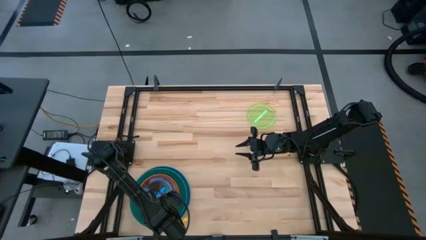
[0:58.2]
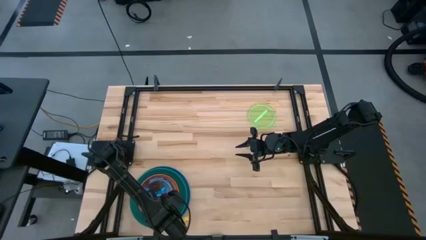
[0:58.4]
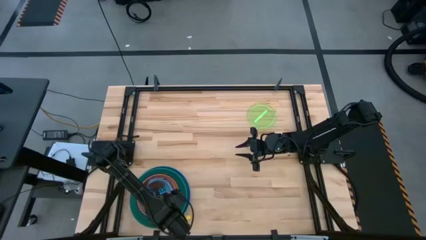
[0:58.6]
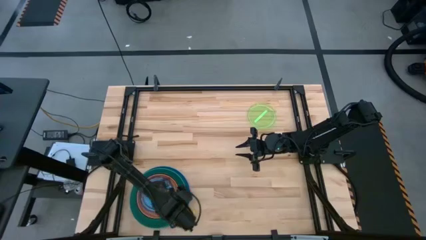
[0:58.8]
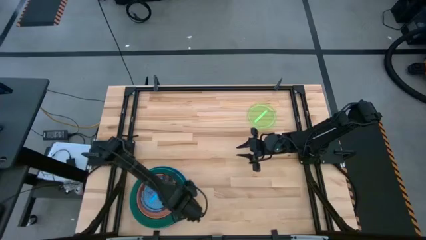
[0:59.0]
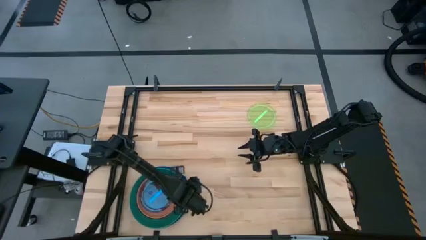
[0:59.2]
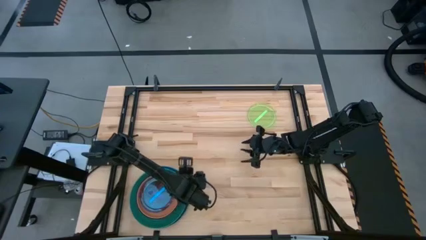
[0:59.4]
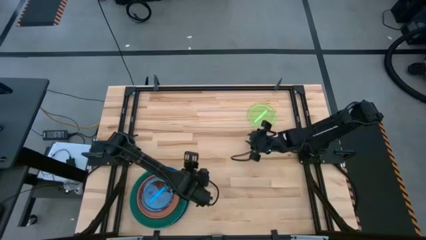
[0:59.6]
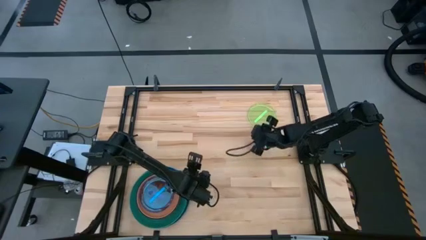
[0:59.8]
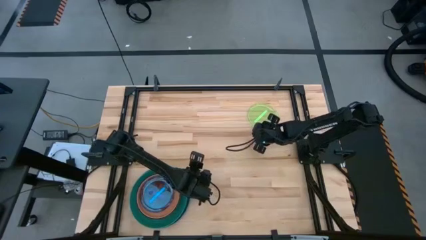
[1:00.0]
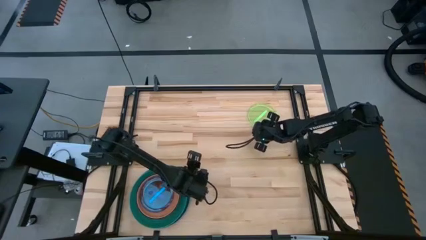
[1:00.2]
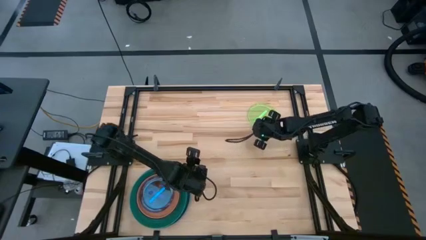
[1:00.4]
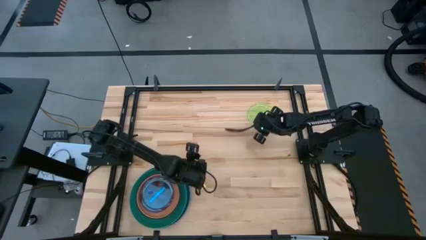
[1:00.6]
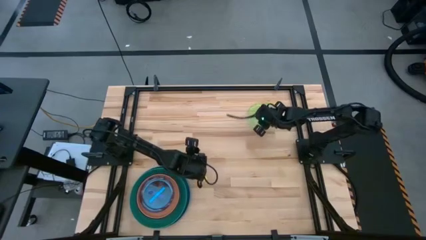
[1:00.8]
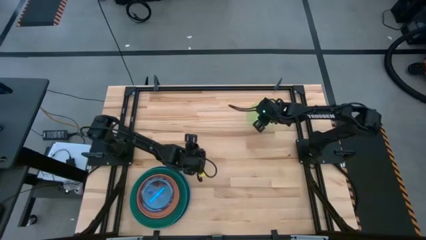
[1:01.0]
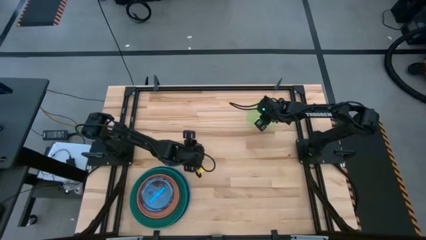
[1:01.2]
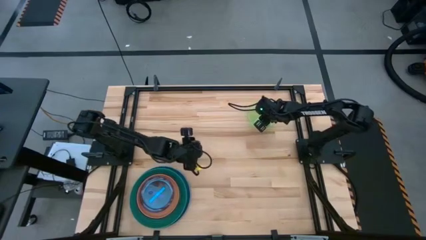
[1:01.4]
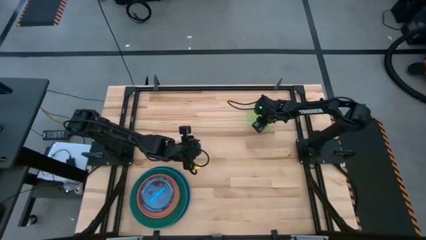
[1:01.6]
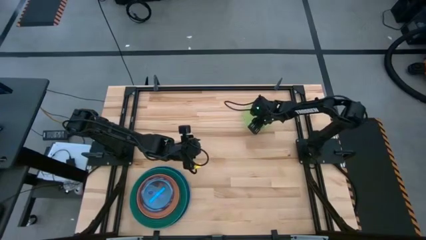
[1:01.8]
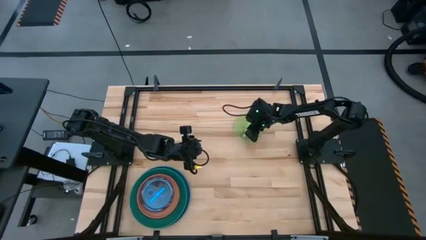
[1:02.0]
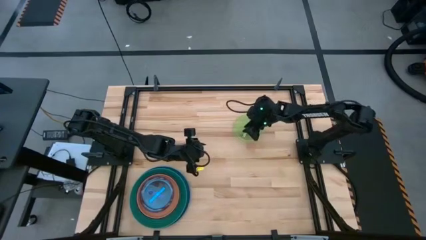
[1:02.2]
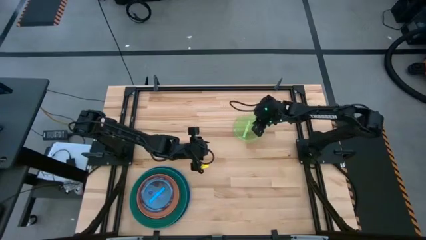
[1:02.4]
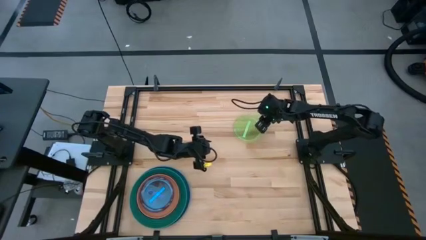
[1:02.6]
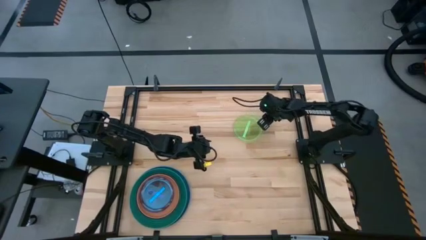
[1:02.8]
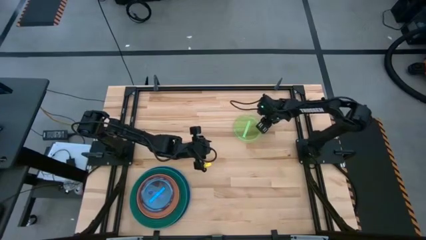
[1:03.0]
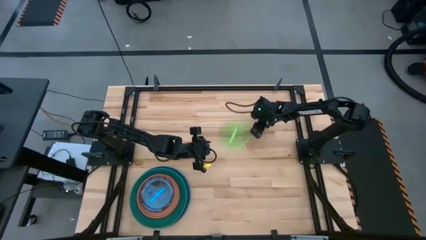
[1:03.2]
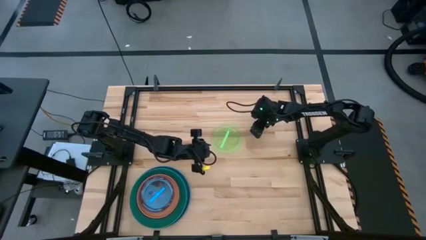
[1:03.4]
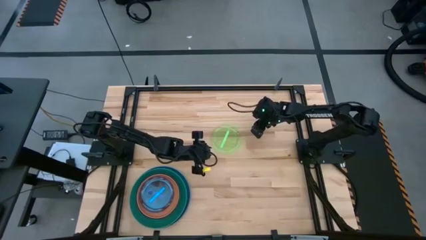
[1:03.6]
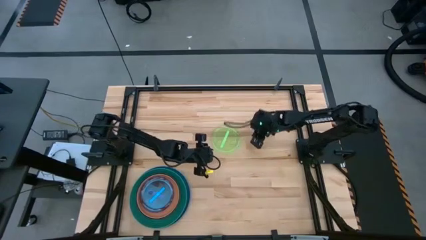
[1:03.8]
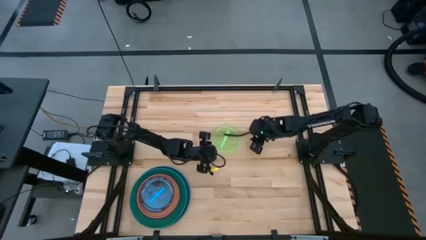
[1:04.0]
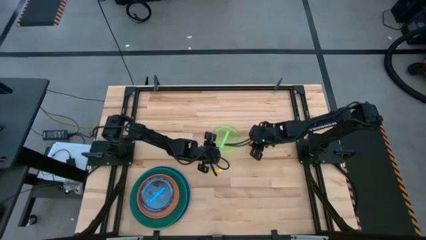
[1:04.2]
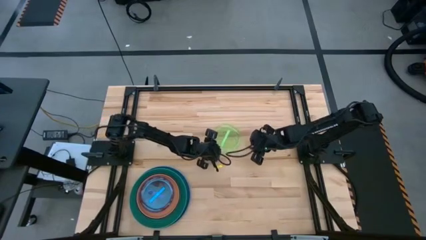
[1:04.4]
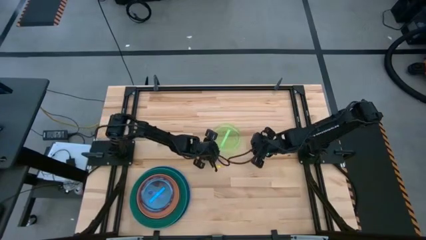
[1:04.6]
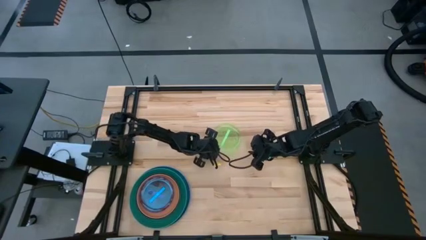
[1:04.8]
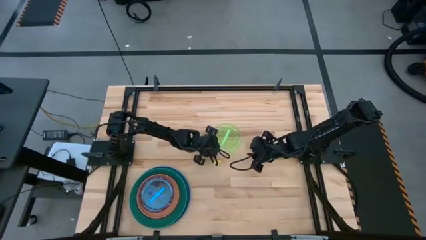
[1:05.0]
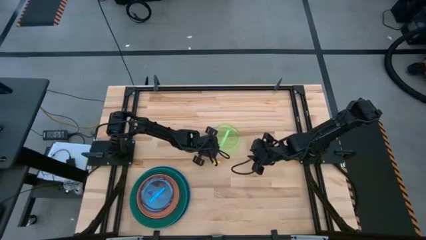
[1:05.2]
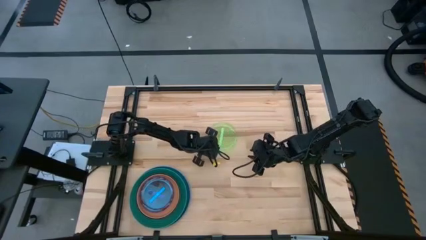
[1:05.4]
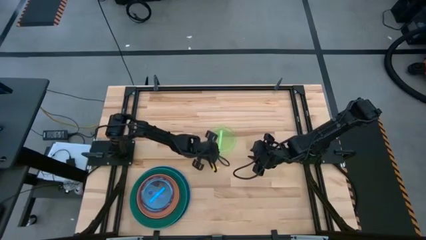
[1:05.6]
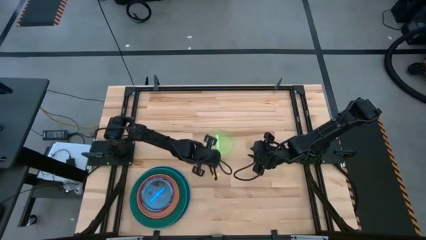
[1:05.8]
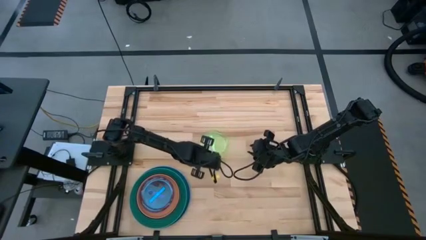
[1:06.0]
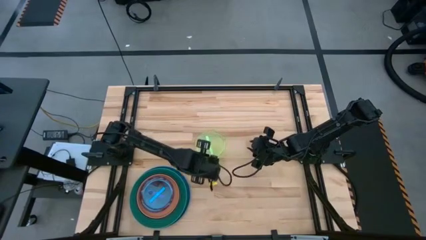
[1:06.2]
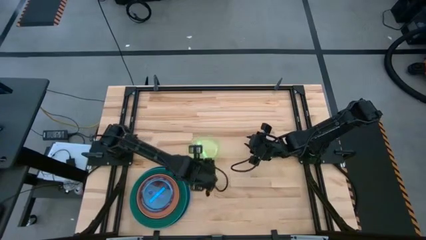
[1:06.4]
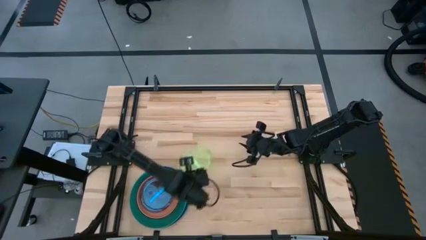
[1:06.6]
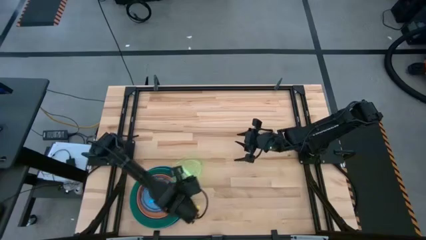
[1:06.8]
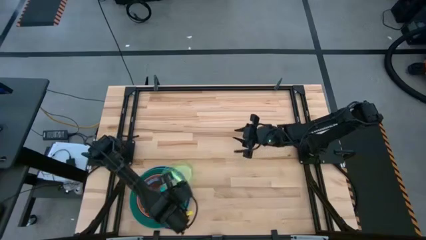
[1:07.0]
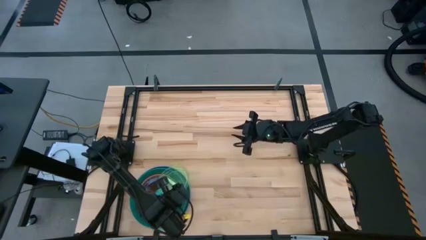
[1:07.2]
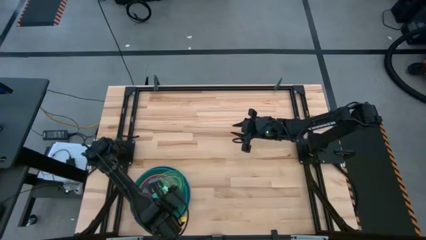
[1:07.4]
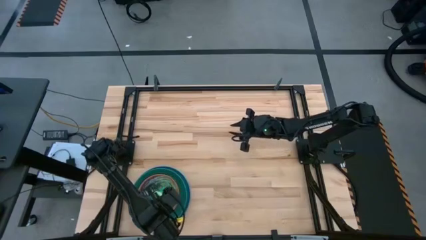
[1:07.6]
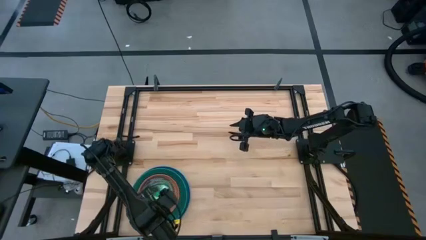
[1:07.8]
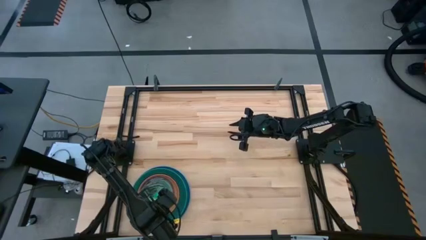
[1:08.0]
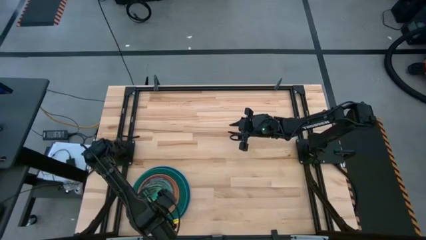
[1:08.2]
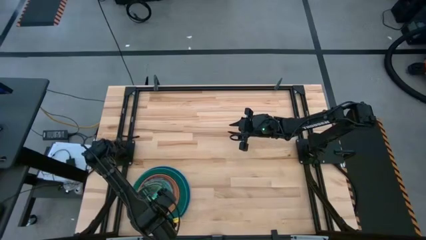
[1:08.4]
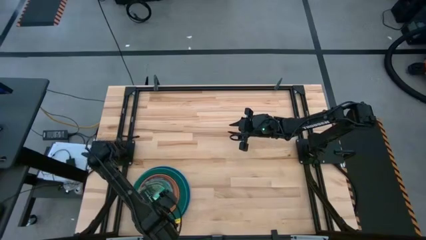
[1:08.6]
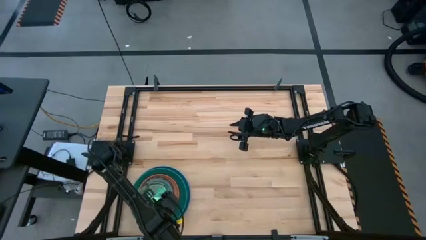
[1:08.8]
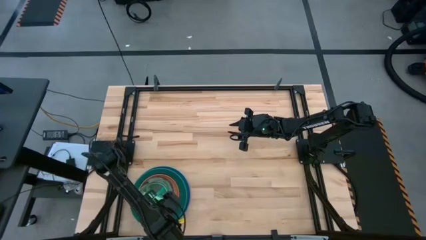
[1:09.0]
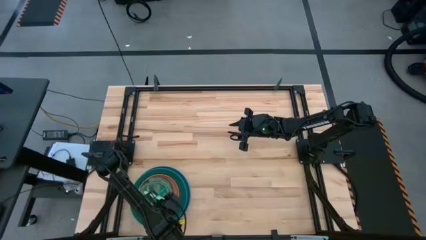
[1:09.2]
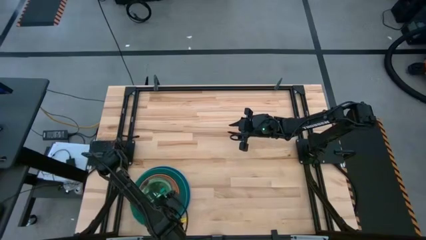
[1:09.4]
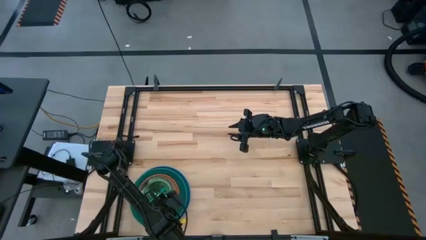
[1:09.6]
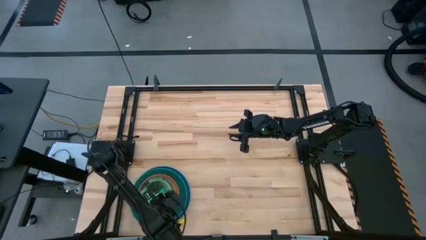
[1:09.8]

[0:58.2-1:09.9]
Task: Stack plastic plates
Stack the light green plate on top of the blue plate

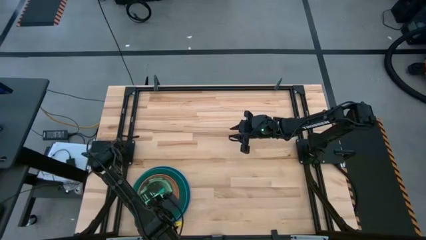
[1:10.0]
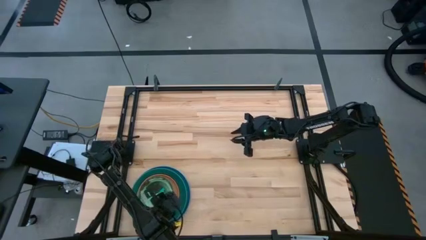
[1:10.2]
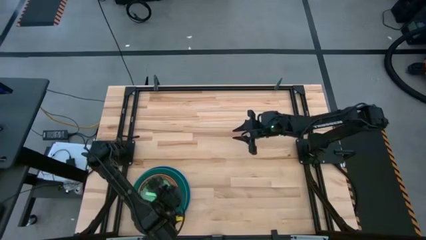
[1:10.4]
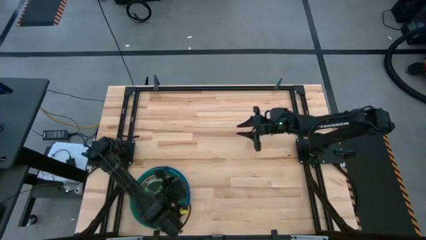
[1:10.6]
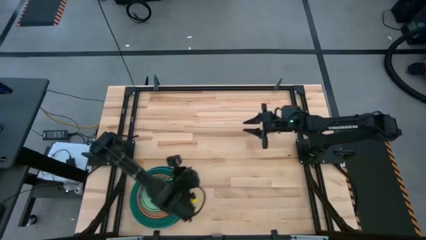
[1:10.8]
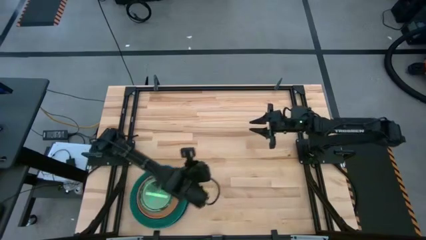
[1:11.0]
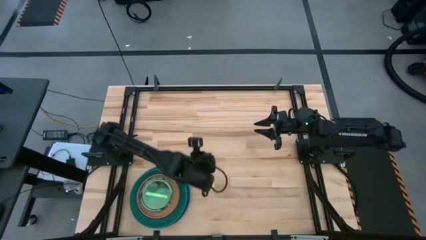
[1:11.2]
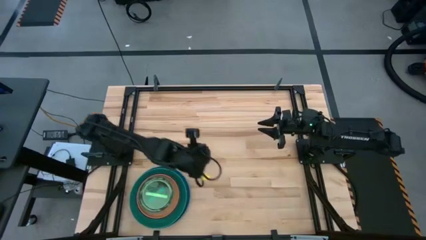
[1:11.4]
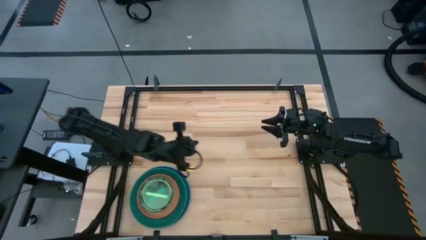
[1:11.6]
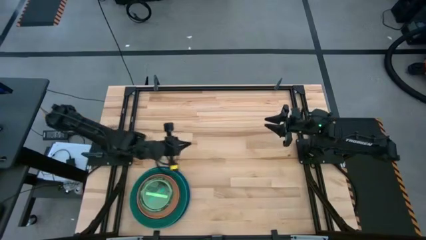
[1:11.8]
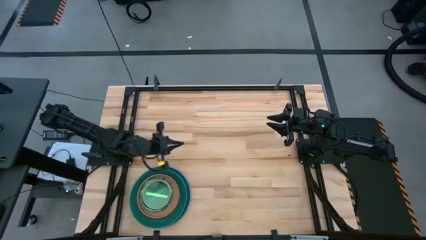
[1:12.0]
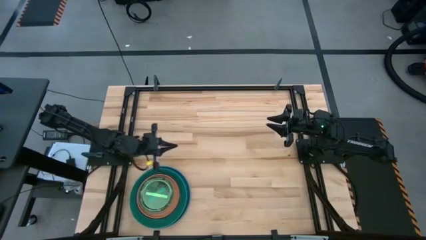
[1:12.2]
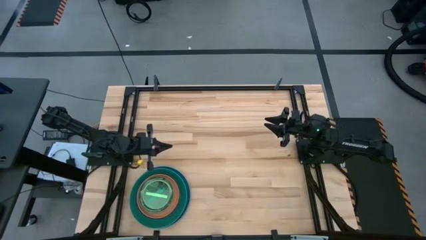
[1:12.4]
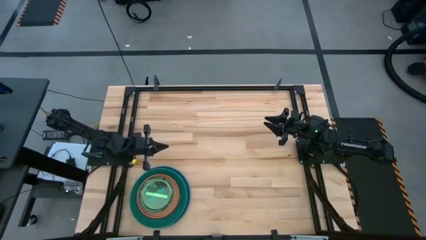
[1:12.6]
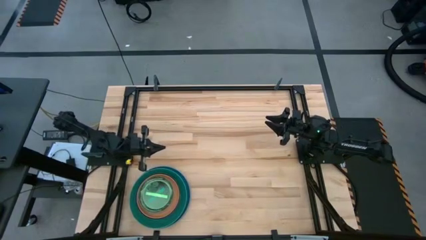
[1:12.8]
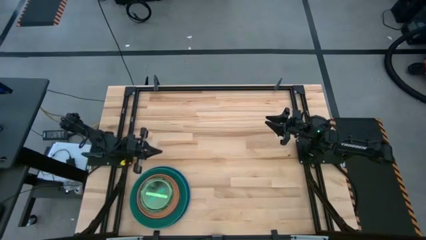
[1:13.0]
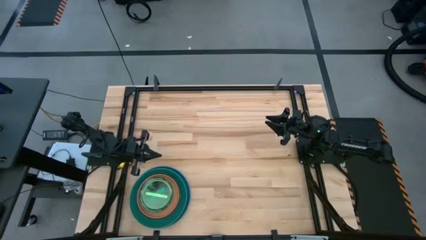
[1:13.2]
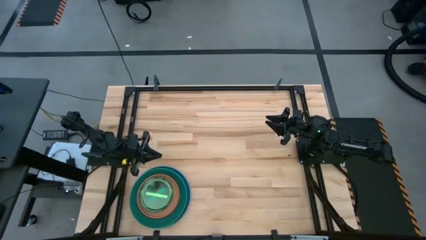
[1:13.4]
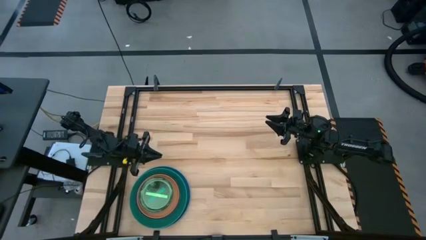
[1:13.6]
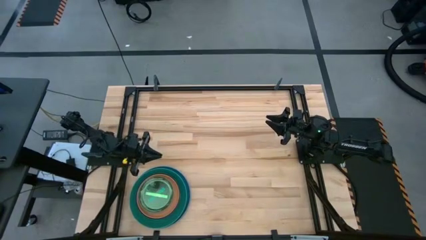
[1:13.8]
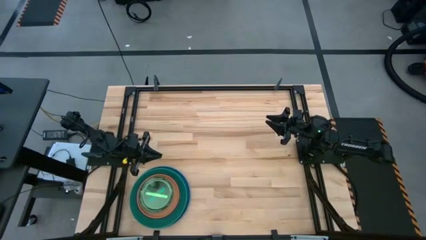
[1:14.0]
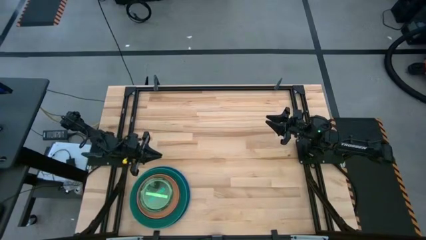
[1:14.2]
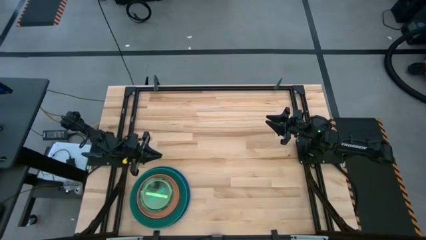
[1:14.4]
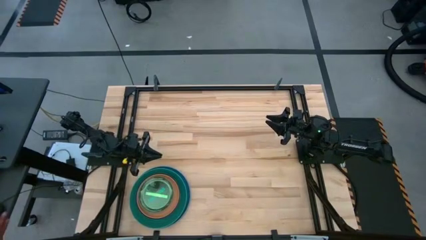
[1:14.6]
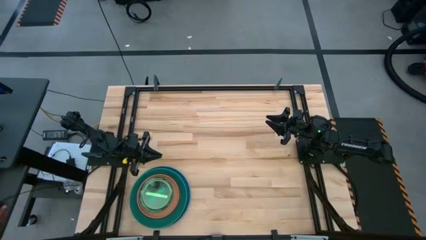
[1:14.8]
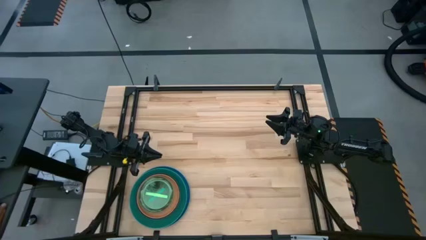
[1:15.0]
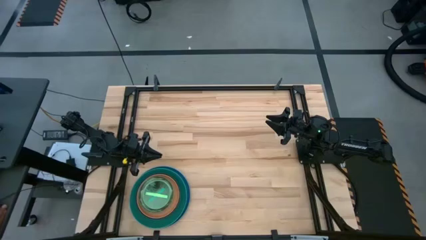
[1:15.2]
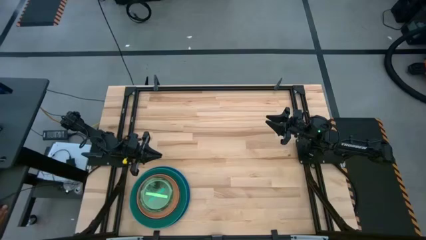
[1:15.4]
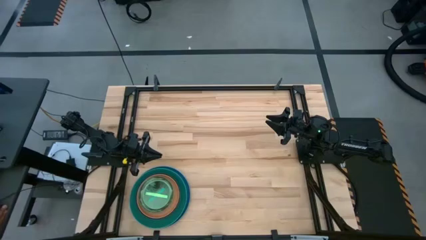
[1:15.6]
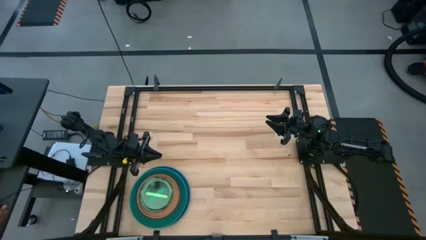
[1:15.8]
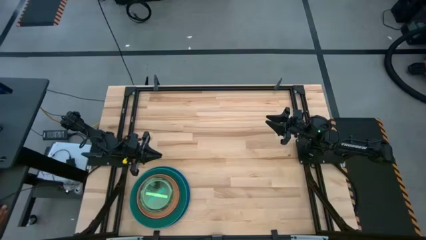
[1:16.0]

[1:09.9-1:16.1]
Return to Home Position
